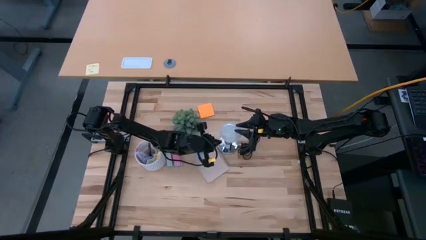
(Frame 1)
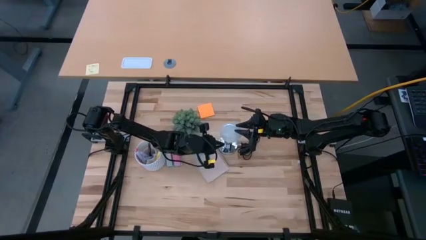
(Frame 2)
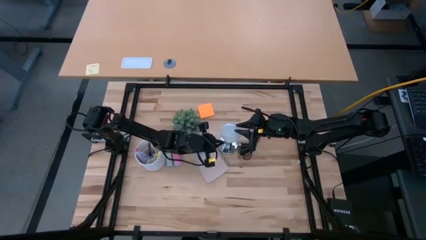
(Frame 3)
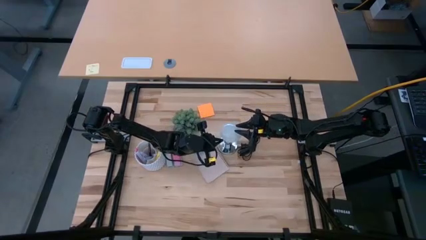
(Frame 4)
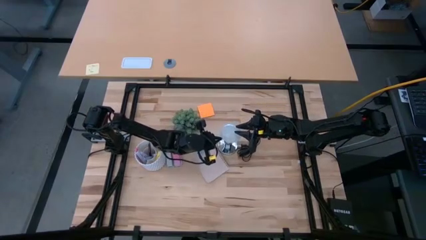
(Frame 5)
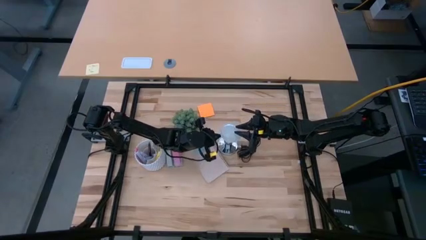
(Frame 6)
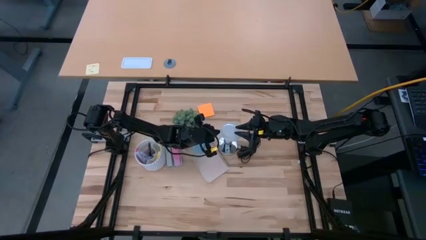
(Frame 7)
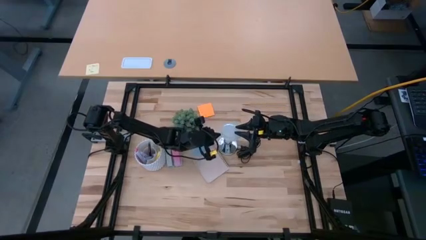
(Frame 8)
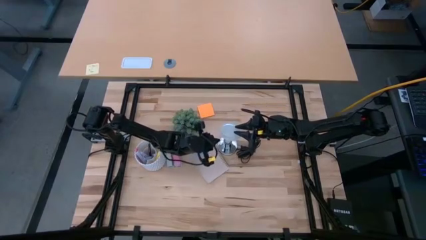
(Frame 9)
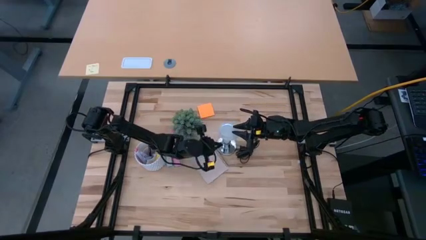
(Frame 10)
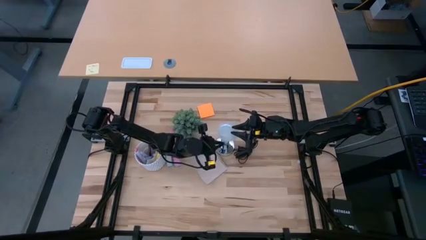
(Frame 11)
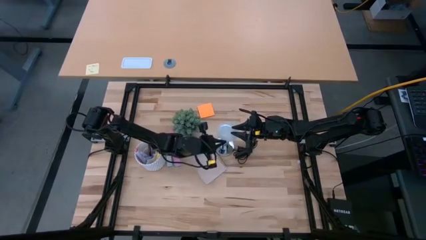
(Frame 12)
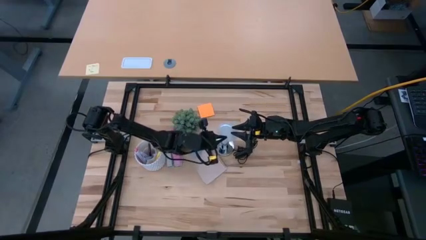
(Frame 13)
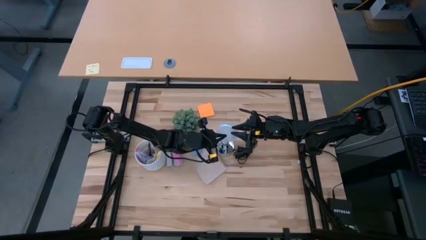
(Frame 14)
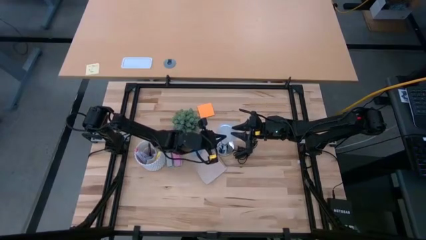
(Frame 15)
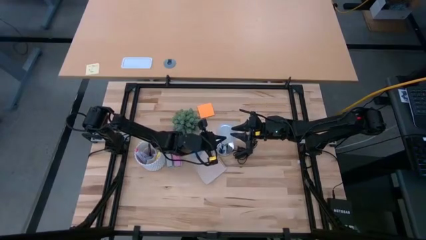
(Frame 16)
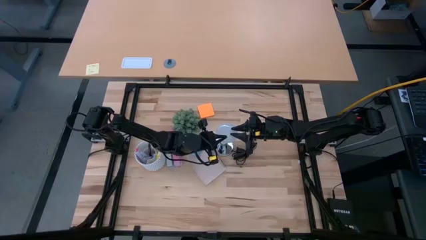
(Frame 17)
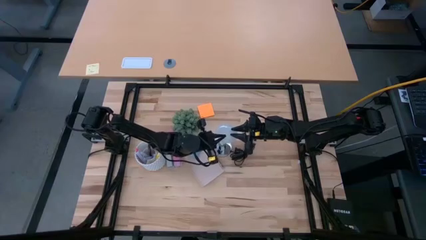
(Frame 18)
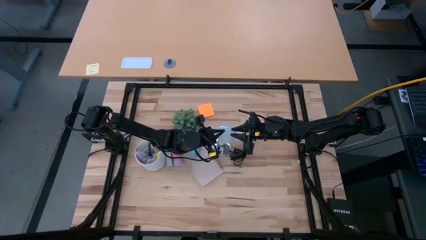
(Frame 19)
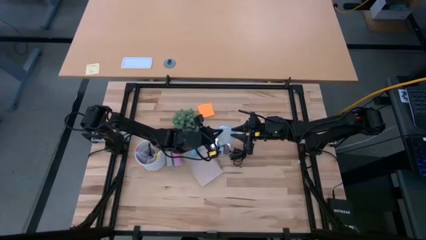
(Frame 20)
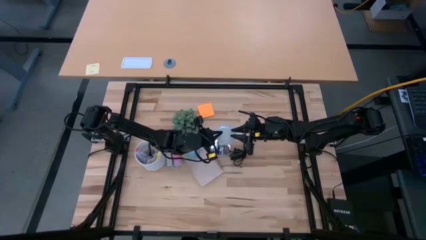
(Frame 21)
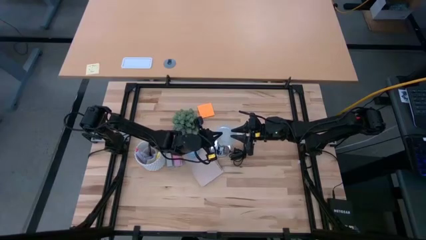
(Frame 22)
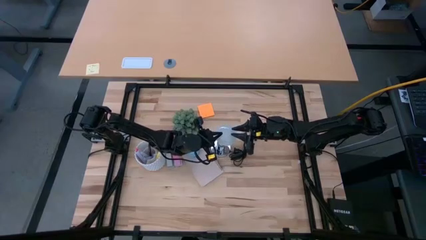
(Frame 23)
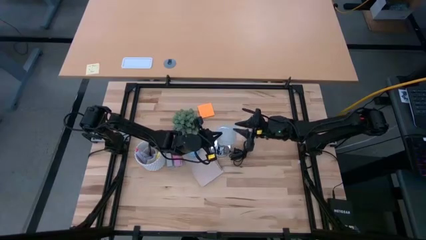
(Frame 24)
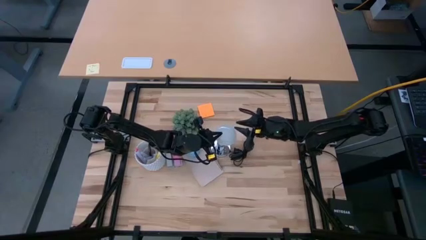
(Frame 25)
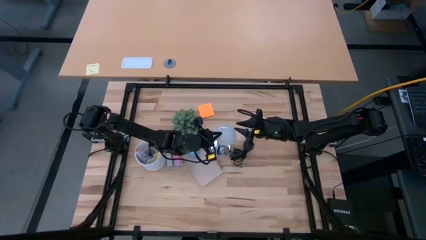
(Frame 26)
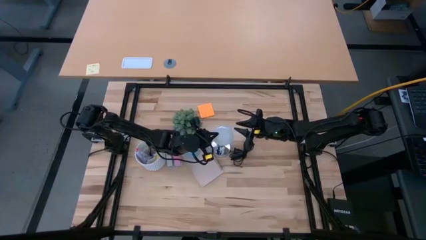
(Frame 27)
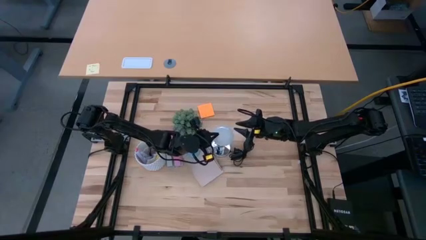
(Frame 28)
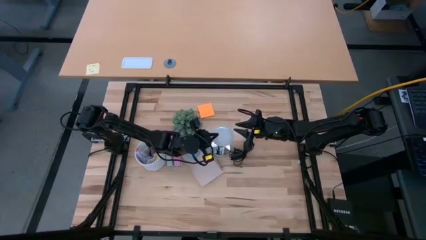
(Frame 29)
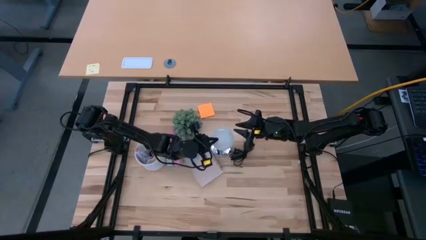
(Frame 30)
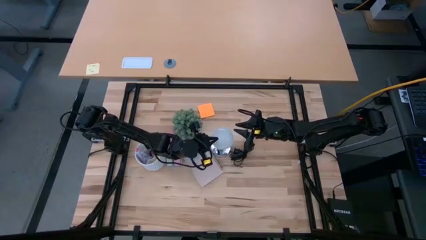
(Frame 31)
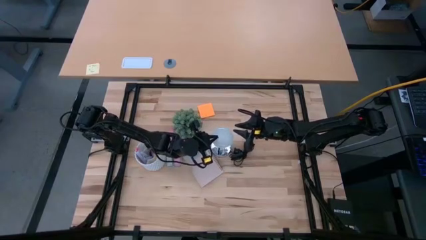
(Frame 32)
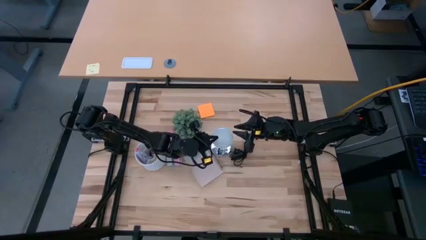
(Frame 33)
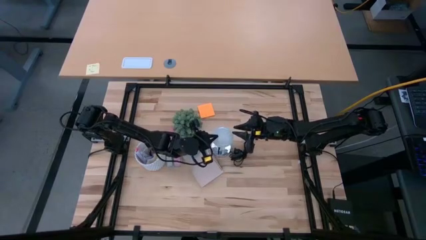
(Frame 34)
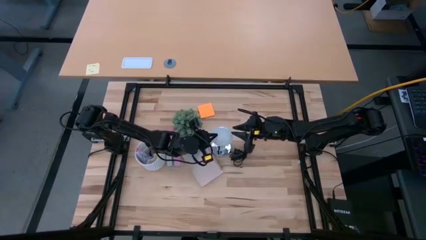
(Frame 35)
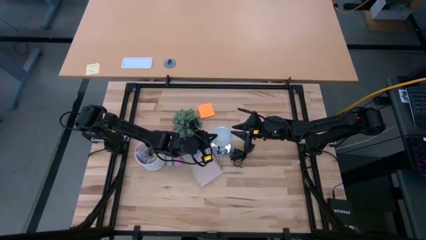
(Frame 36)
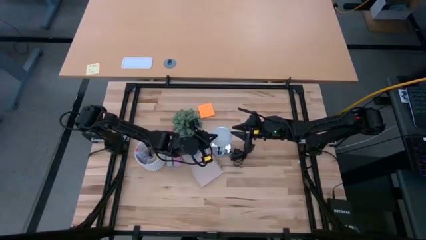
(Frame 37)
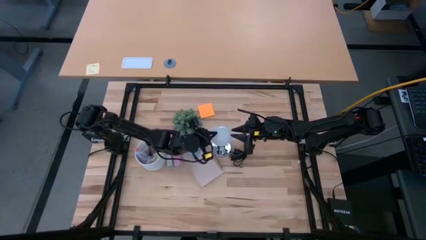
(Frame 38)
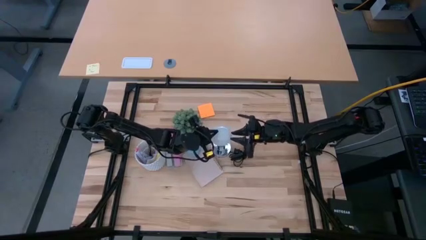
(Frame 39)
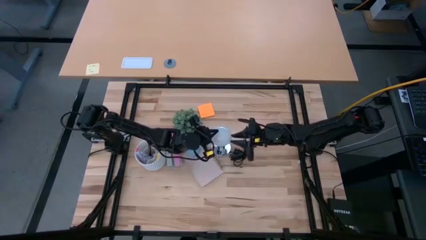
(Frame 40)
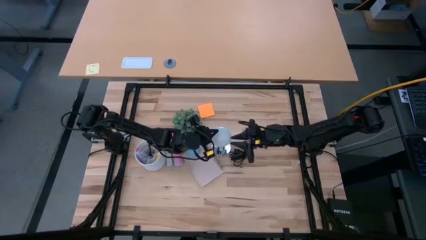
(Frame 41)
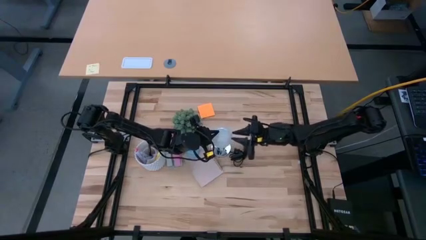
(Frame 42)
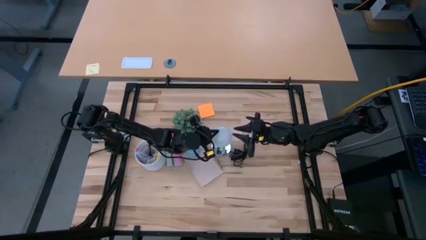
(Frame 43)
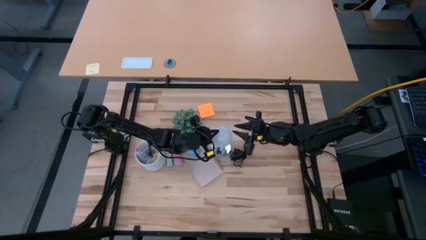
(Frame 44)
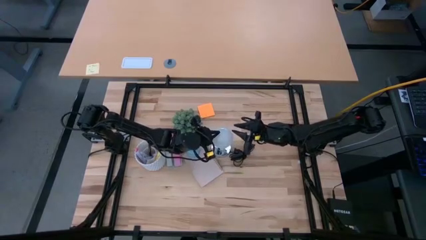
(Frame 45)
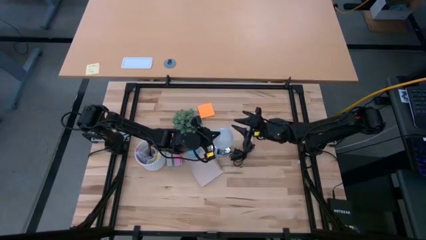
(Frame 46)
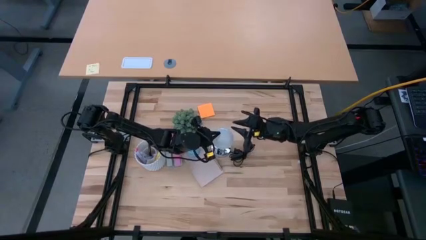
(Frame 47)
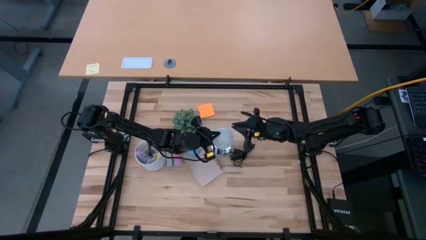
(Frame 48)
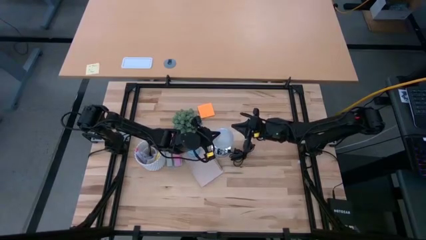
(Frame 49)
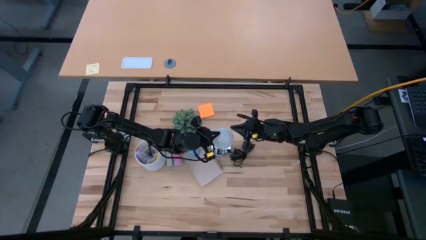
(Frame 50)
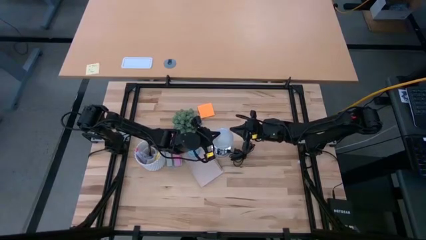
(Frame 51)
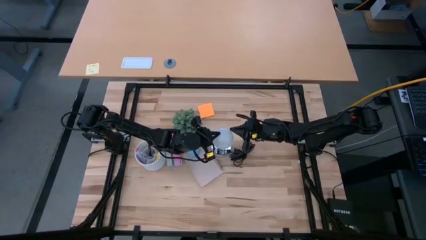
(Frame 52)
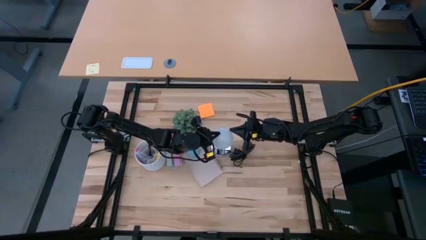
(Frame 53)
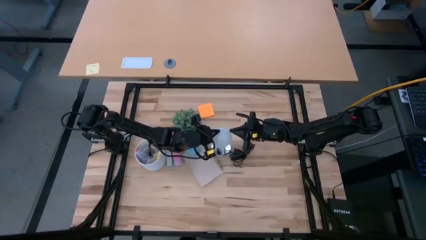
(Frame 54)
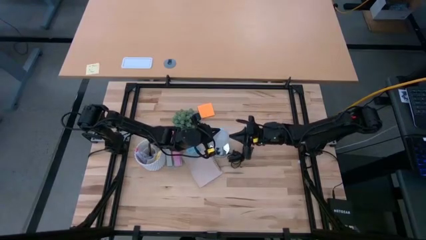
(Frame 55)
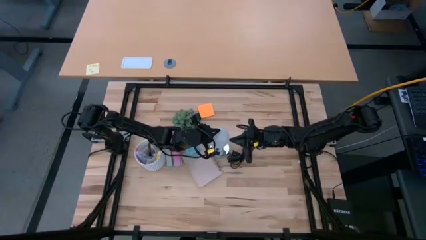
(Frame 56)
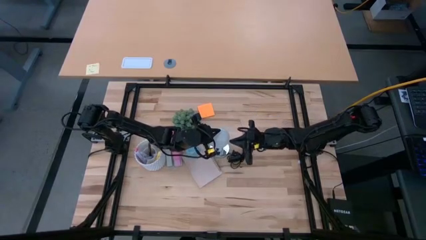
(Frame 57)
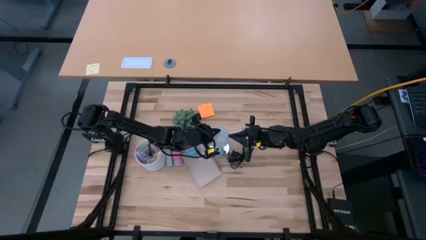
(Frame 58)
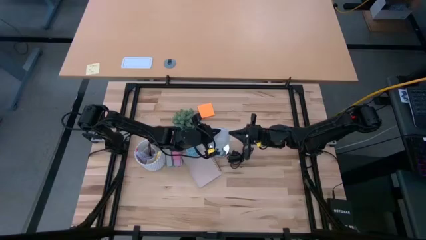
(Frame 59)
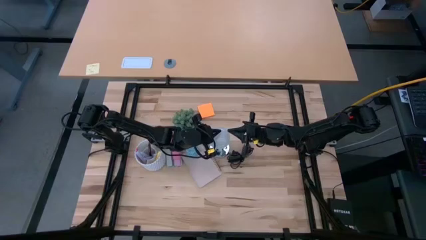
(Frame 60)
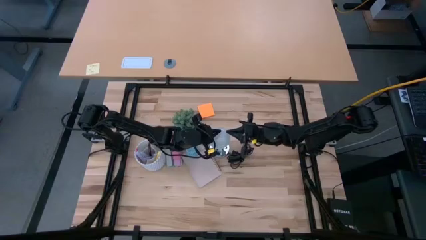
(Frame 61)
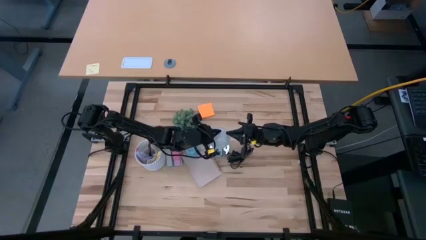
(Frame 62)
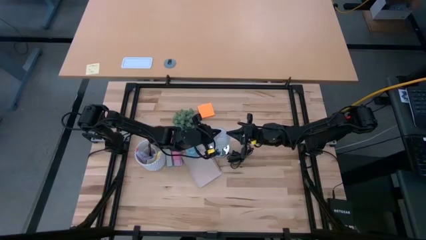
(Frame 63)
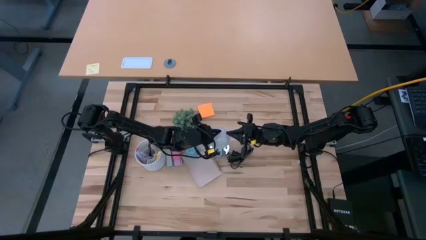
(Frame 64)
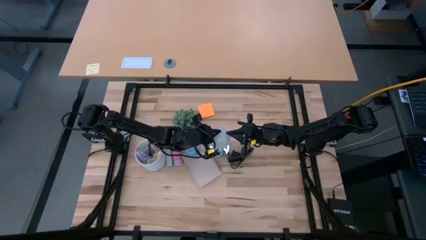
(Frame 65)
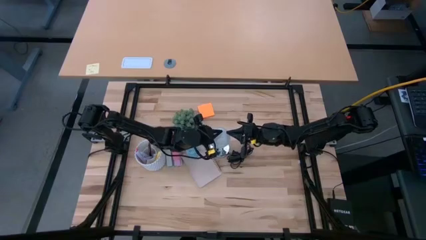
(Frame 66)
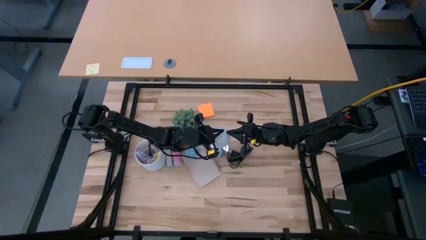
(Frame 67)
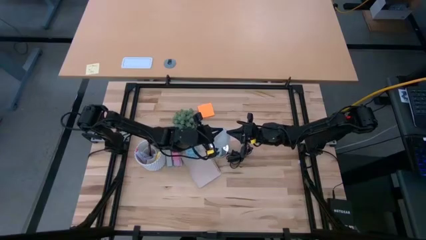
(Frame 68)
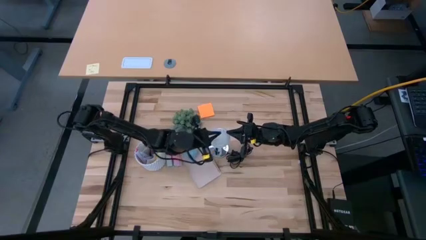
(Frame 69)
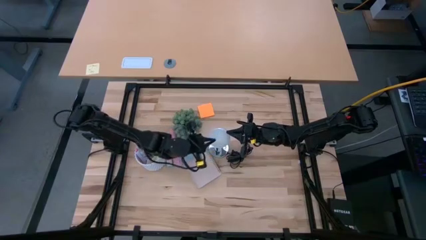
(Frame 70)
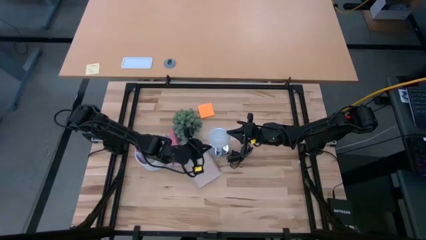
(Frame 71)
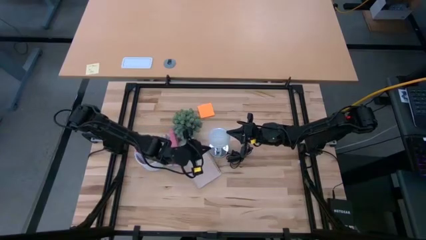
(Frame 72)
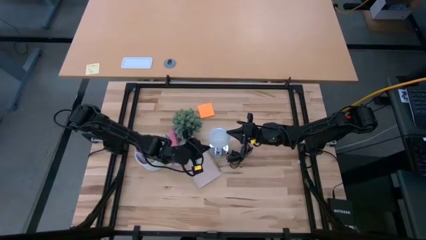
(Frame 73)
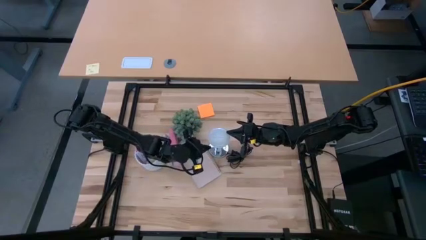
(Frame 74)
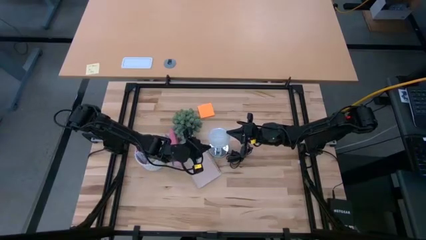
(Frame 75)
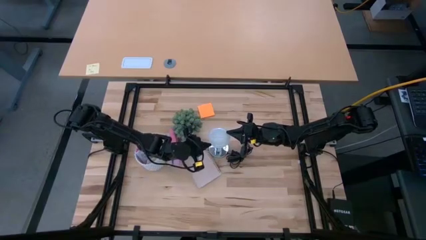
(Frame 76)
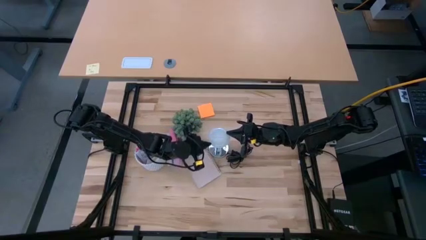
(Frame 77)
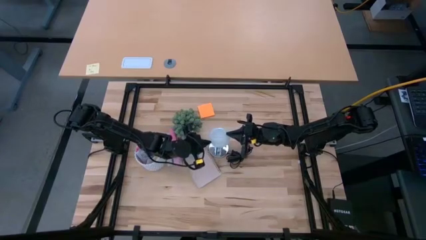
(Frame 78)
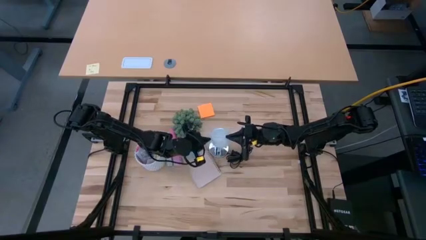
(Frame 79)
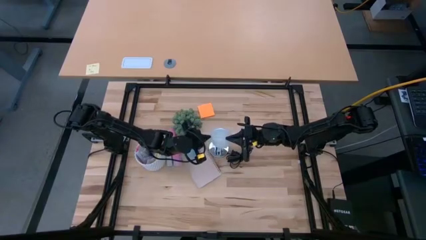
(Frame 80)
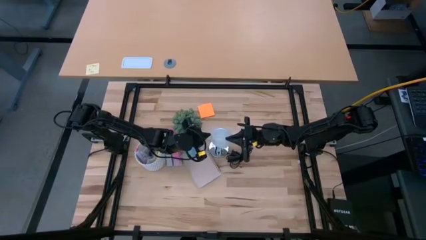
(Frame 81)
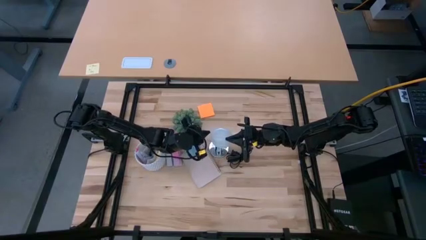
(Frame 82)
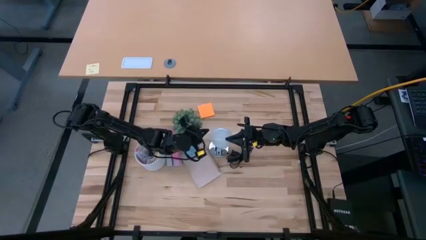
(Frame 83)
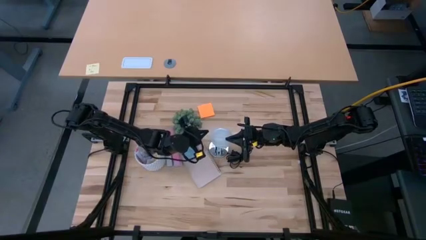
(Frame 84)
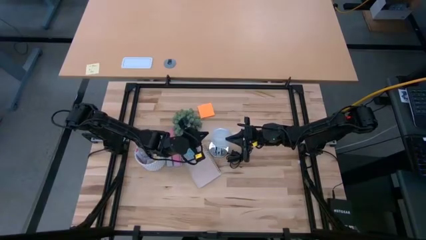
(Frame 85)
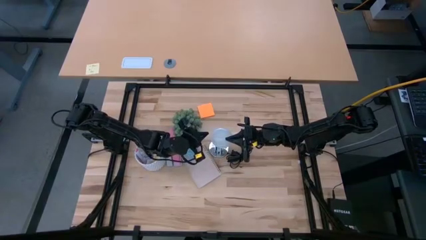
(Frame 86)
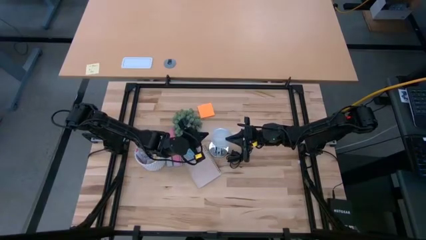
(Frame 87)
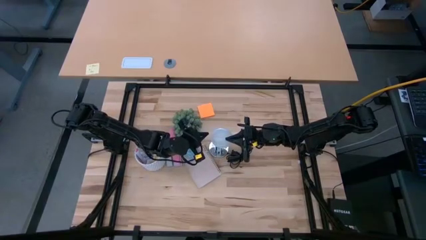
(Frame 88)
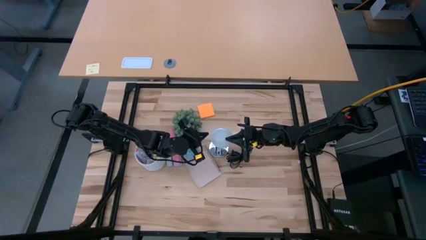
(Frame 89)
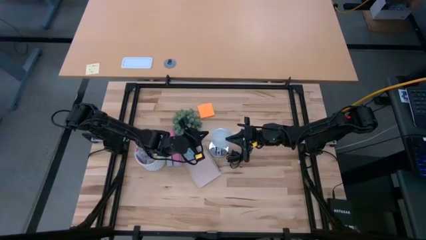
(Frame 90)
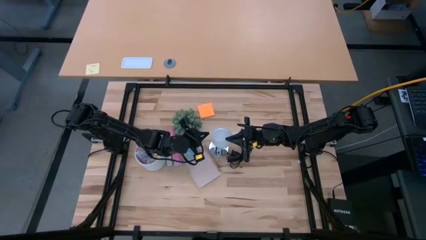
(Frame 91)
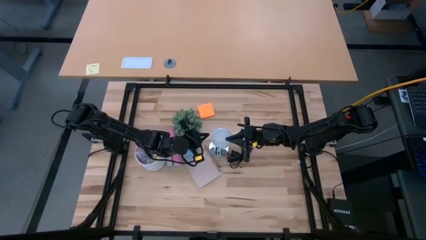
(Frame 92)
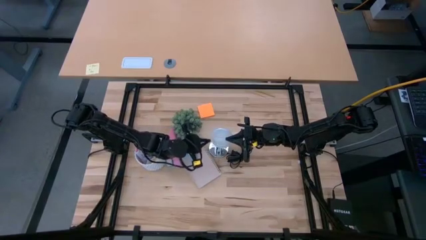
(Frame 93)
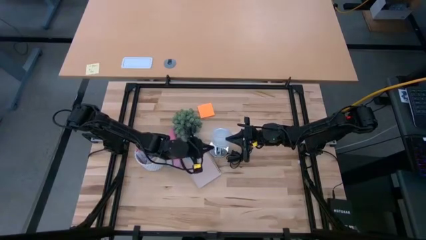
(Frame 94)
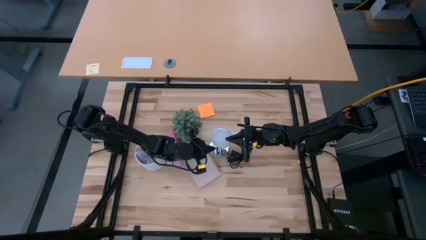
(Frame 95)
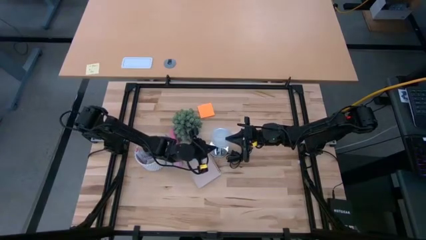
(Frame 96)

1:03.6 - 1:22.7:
Task: Screw lightbulb
Insert the lightbulb into the silver lamp socket
